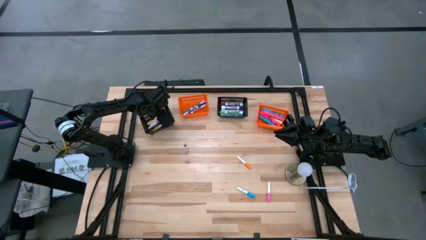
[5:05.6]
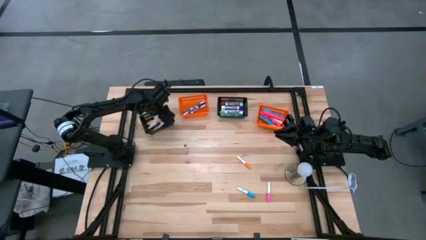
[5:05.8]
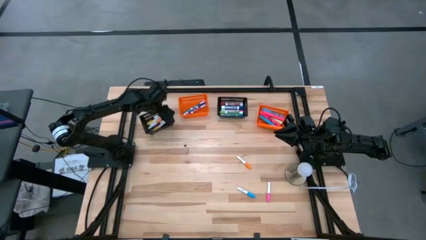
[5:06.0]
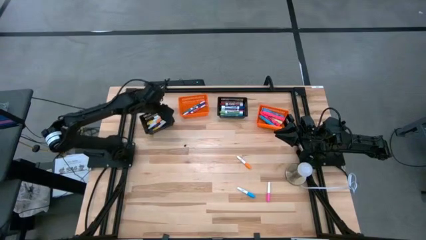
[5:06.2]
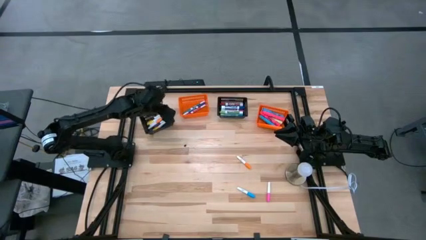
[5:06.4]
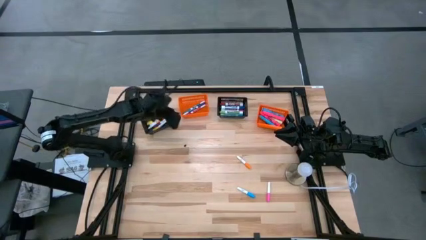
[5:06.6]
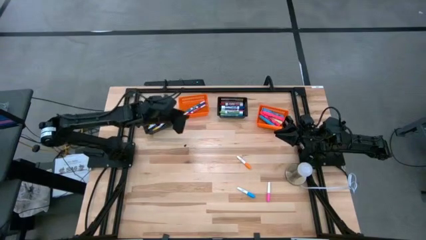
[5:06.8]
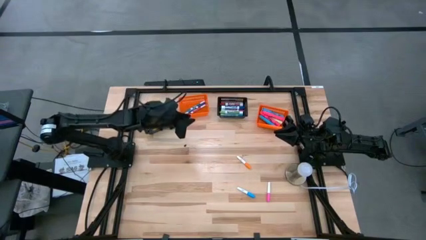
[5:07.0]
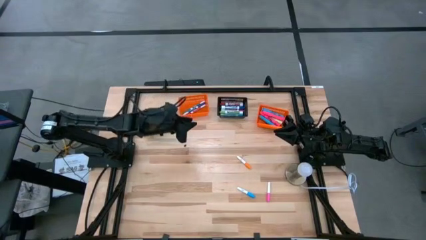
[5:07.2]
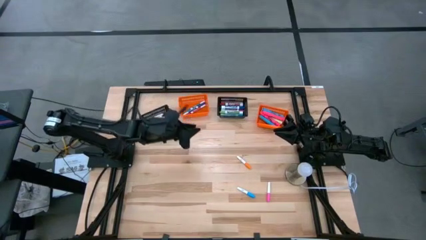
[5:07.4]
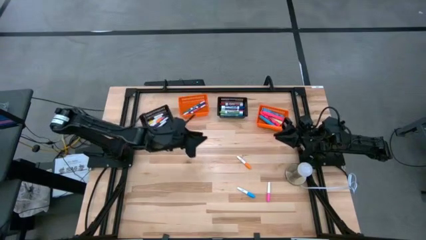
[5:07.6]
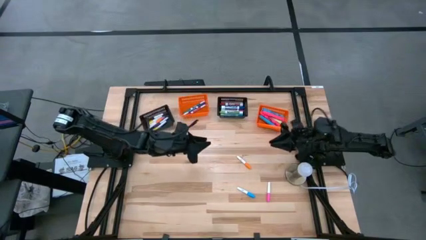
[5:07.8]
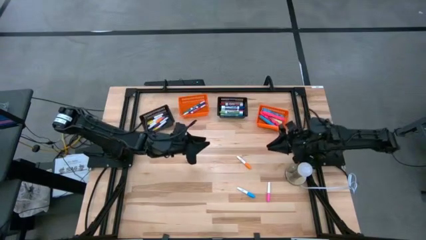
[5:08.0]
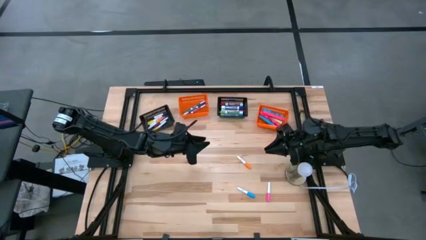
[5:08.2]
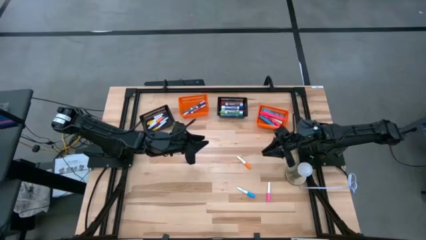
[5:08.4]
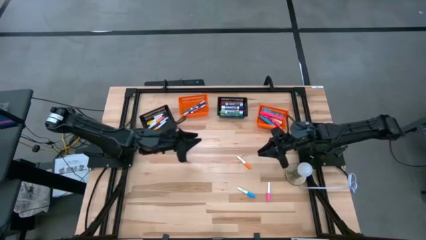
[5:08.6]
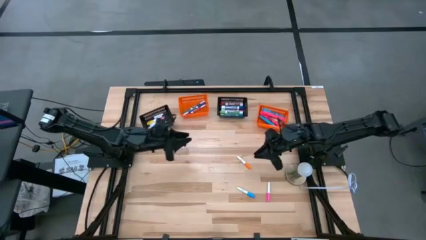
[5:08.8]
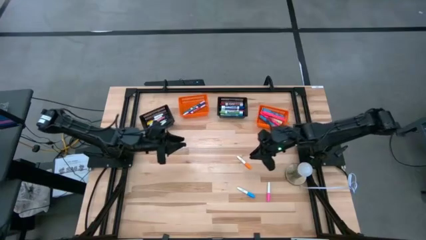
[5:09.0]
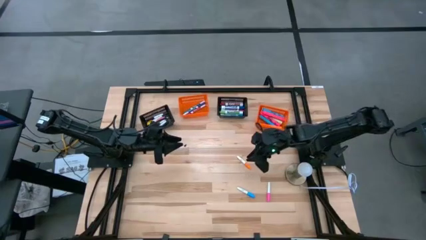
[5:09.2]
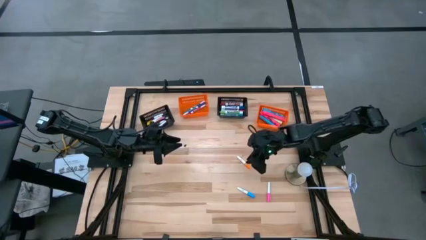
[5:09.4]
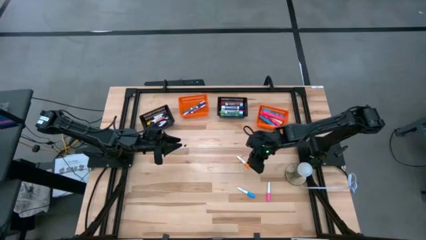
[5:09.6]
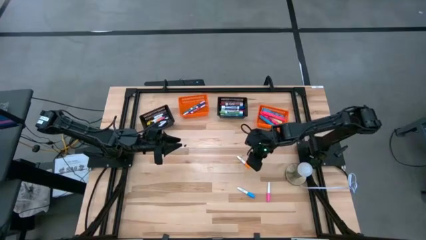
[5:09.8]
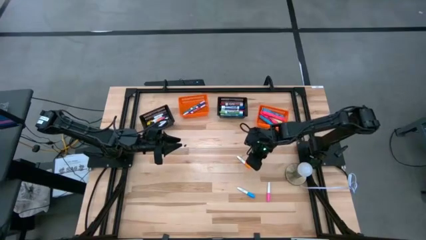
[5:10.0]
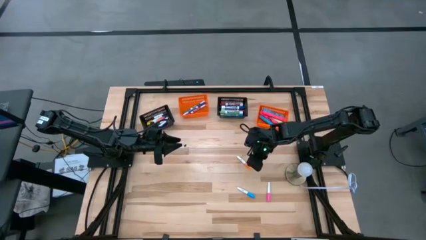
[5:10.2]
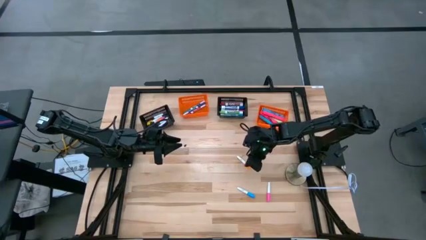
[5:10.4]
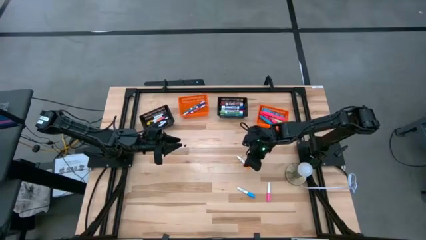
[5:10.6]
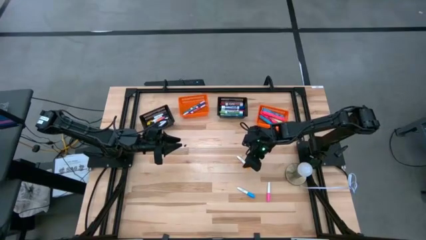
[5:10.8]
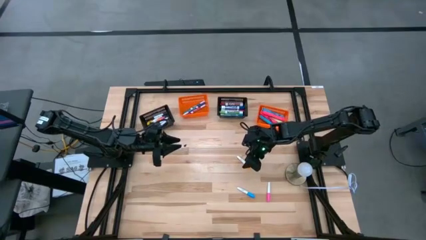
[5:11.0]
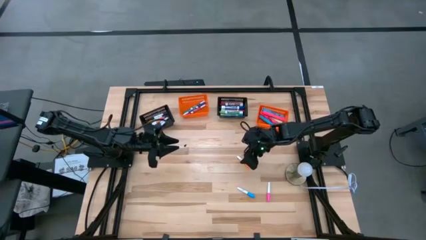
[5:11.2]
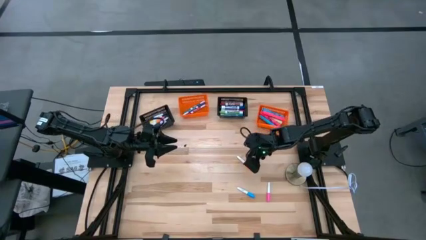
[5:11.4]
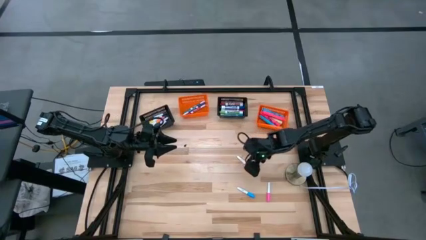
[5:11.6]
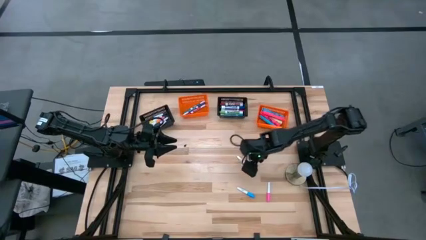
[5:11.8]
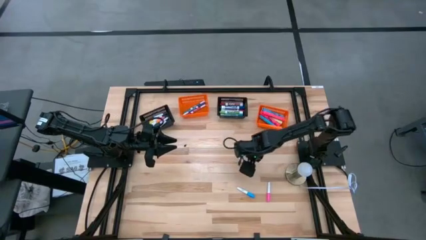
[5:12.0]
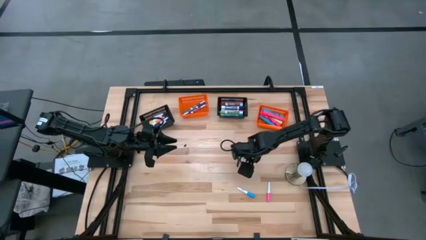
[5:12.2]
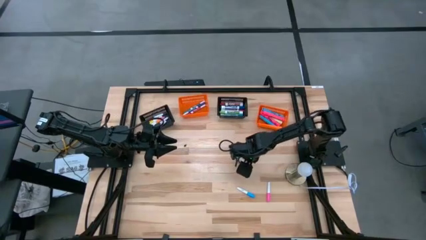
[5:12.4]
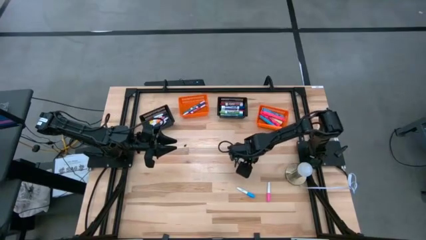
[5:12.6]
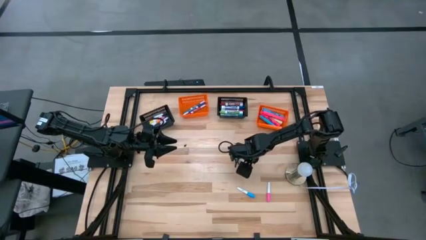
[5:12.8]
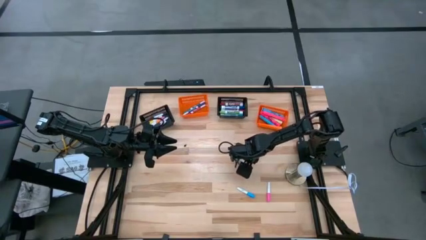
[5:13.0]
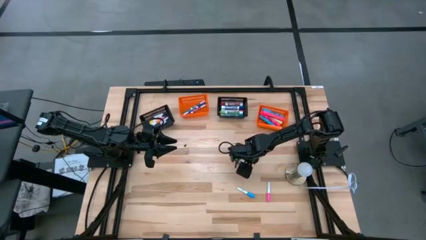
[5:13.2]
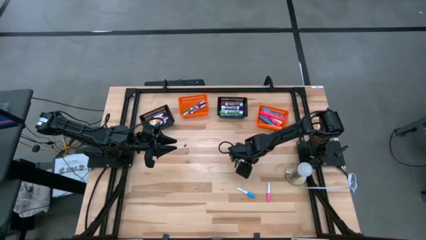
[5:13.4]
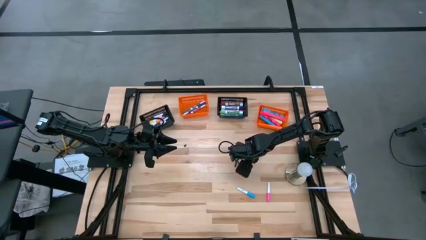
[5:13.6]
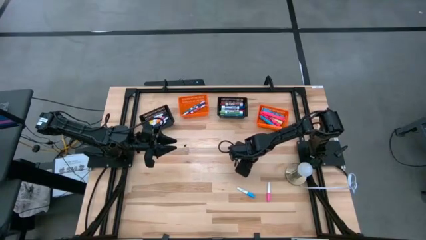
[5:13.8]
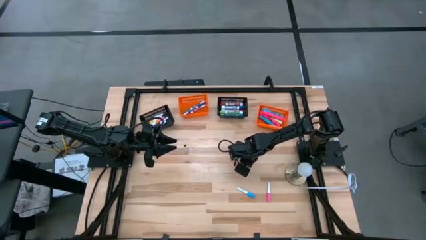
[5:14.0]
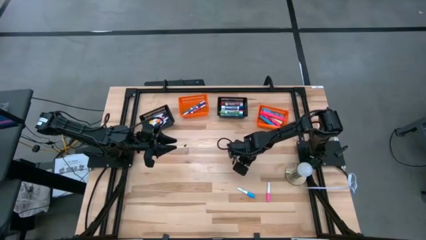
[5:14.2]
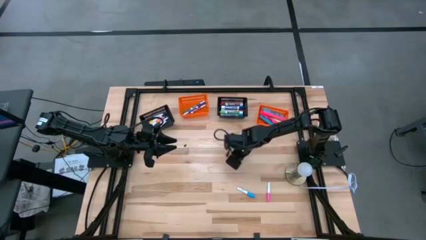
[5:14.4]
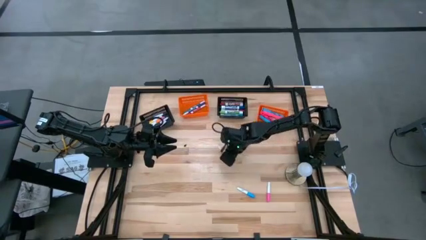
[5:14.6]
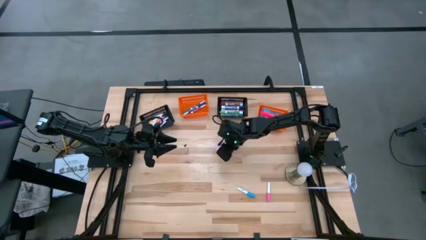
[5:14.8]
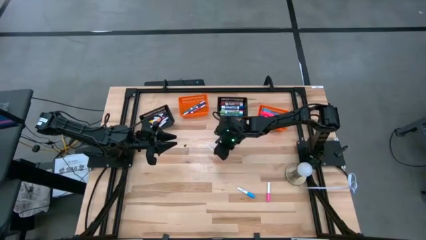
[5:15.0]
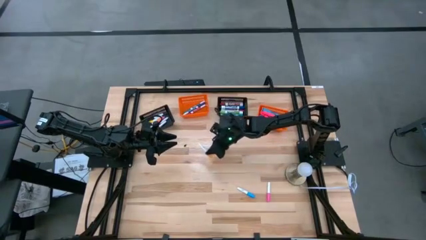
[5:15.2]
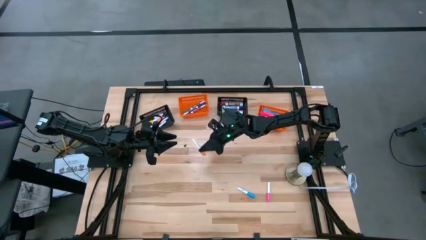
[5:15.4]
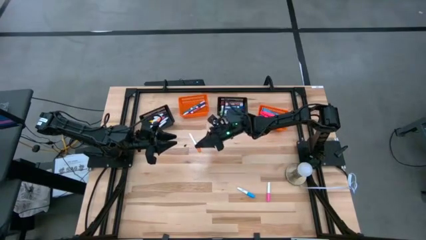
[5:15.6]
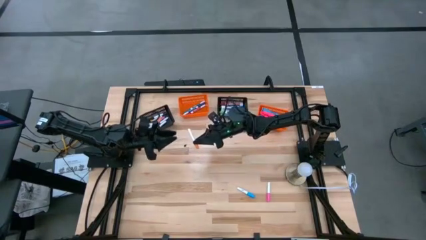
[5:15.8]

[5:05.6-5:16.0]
Task: Pick & Place Markers
Put the white orange marker into the left black bin

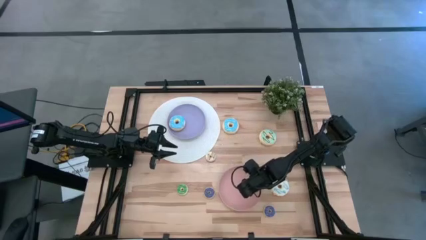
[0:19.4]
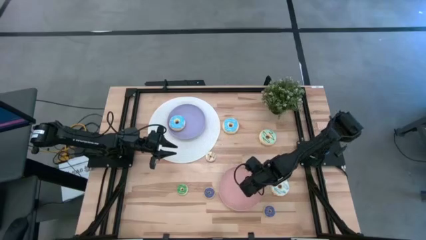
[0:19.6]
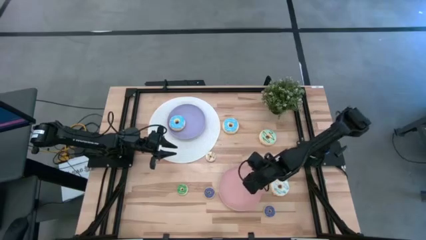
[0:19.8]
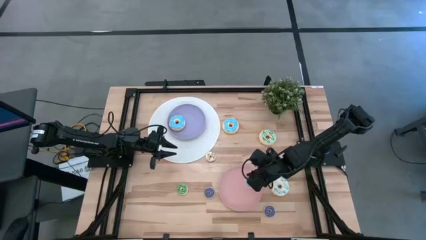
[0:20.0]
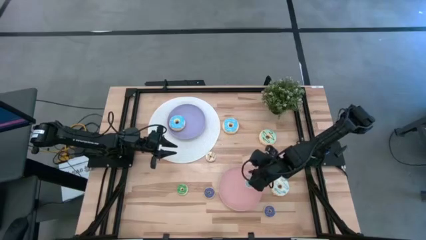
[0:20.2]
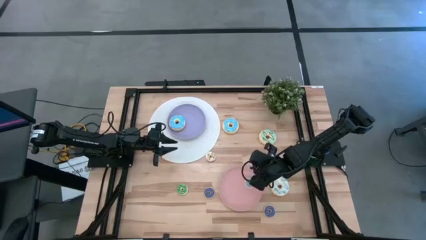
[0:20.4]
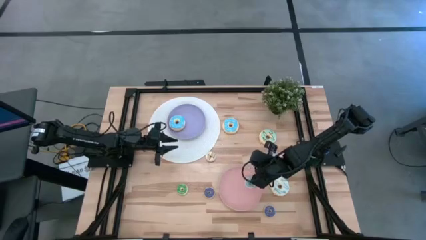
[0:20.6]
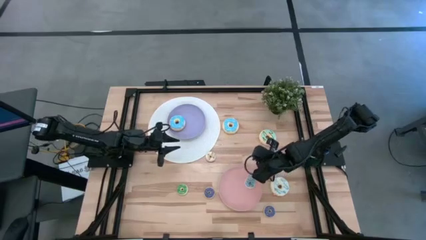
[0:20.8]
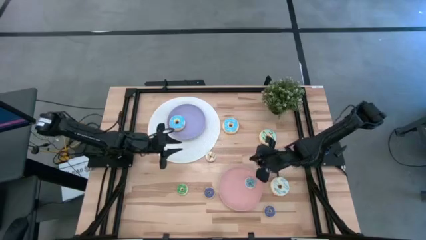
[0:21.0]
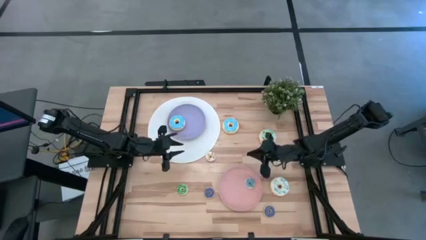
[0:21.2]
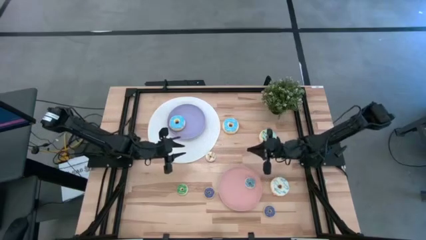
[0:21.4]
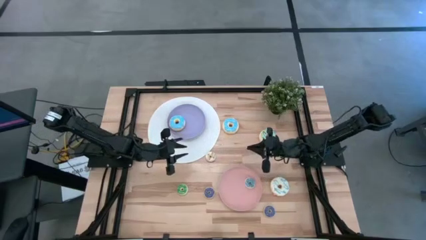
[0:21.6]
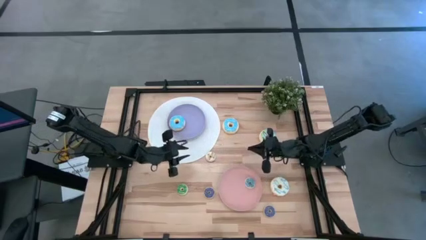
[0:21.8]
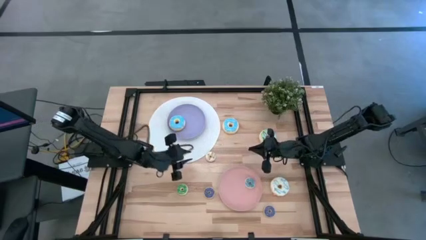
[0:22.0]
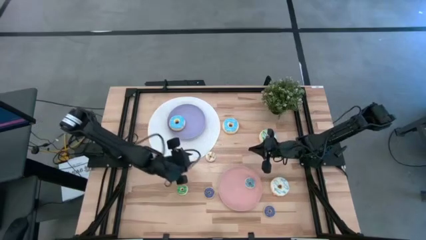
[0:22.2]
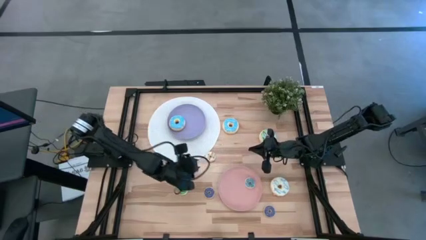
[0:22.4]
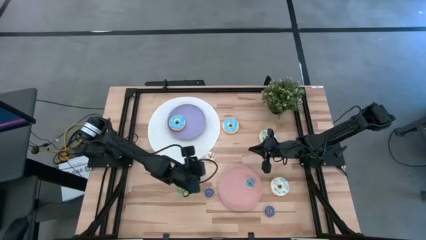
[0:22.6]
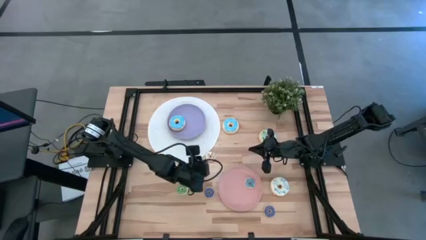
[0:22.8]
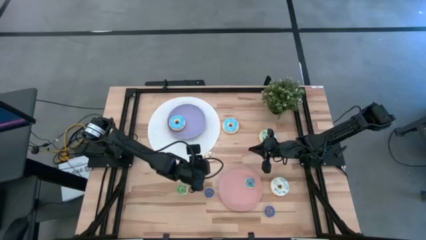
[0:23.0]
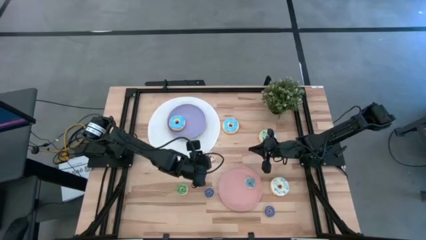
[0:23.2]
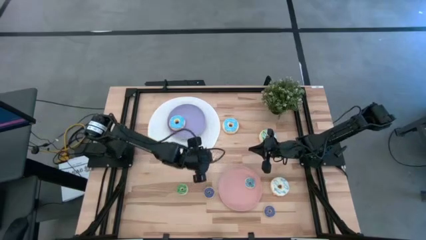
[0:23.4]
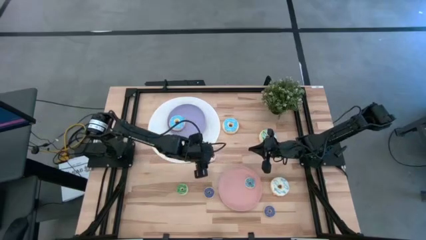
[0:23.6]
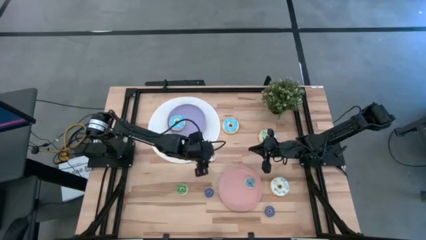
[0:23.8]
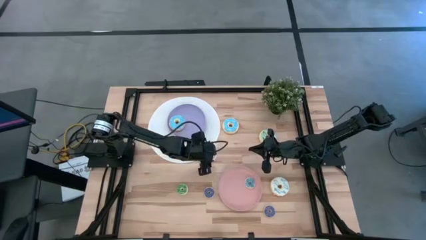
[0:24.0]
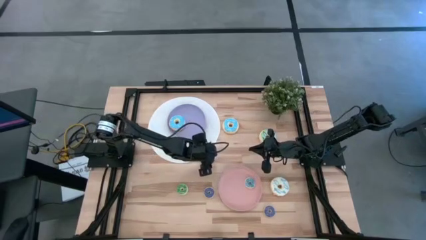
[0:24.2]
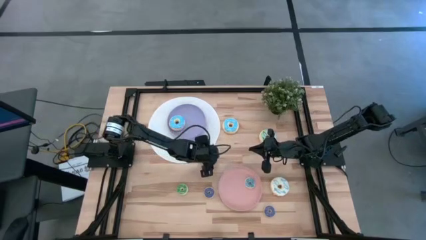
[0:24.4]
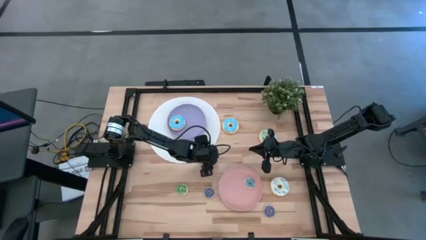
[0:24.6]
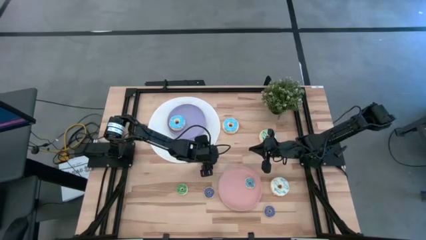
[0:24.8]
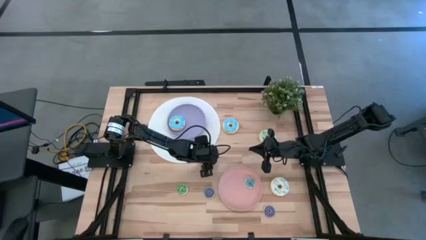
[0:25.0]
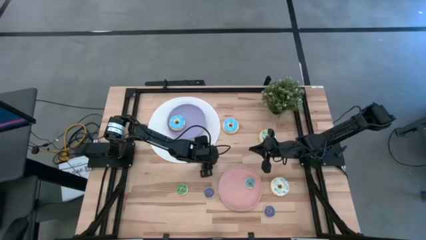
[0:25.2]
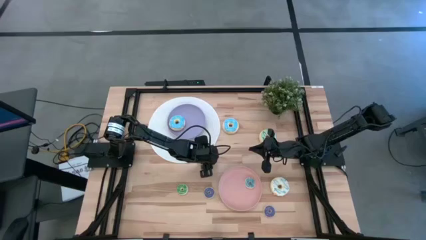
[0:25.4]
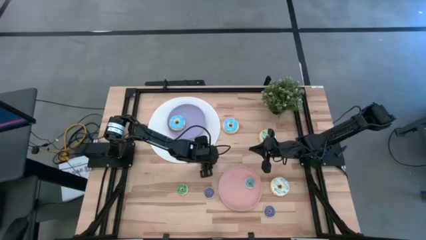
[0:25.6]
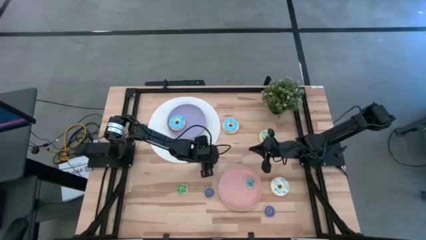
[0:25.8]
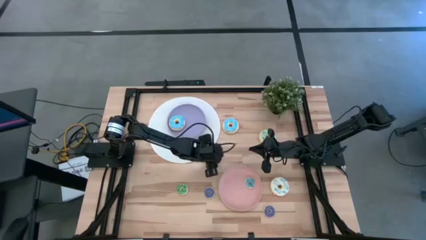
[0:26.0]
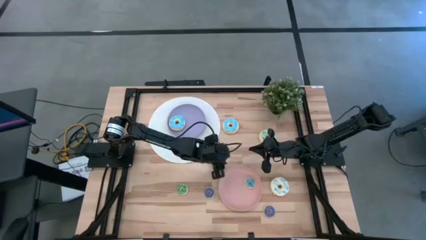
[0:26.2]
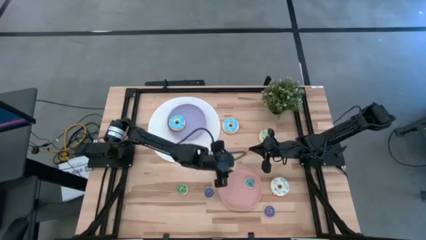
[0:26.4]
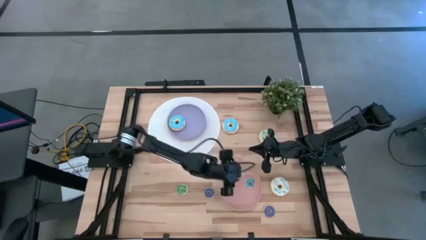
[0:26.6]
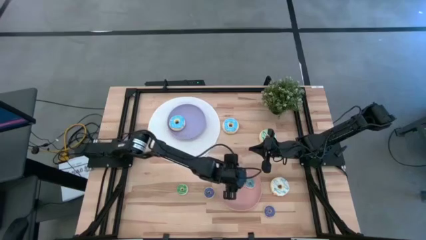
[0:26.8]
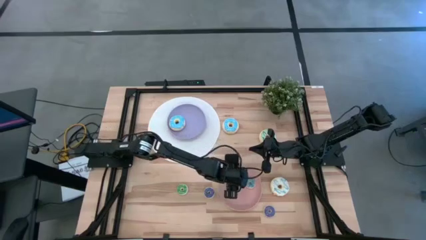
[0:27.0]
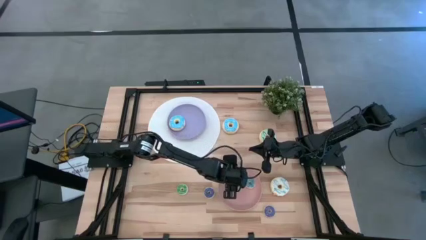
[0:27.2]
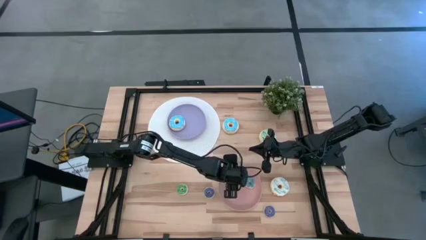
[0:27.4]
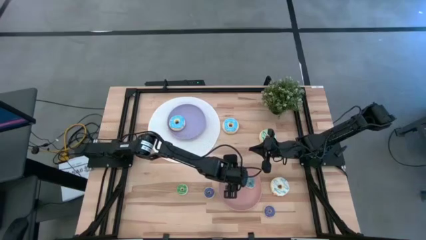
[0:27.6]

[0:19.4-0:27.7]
Task: Pick & Place donuts
Put the small white donut on the pink plate
